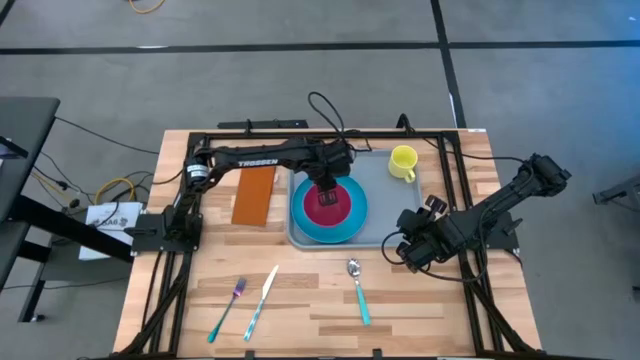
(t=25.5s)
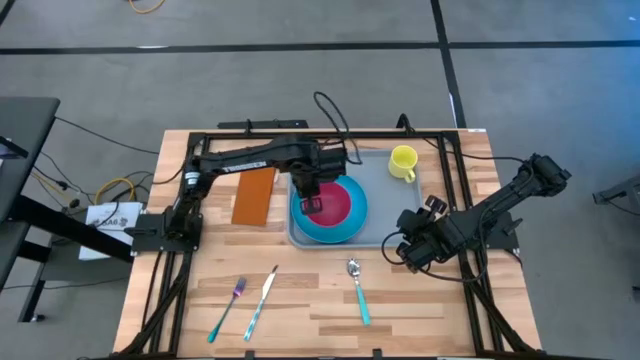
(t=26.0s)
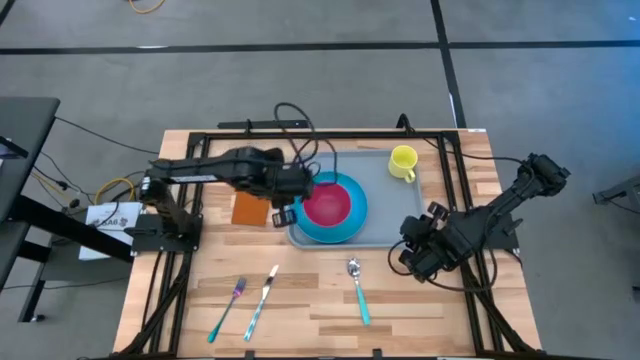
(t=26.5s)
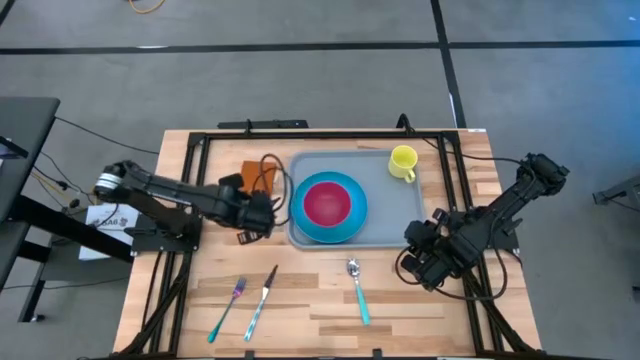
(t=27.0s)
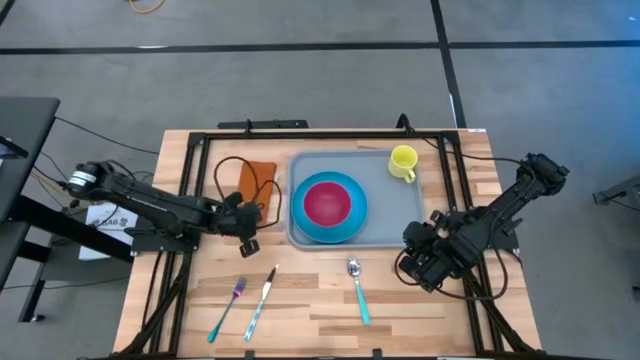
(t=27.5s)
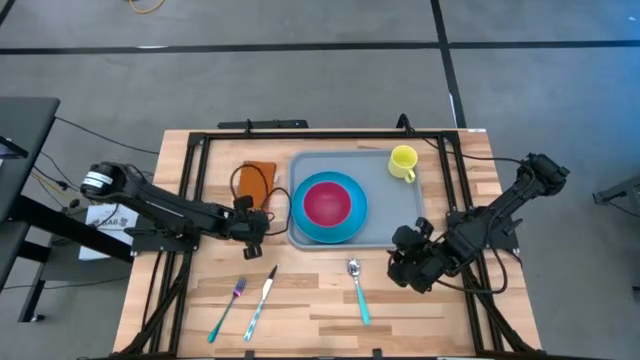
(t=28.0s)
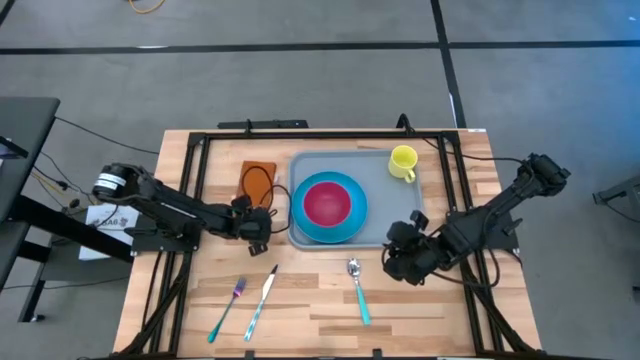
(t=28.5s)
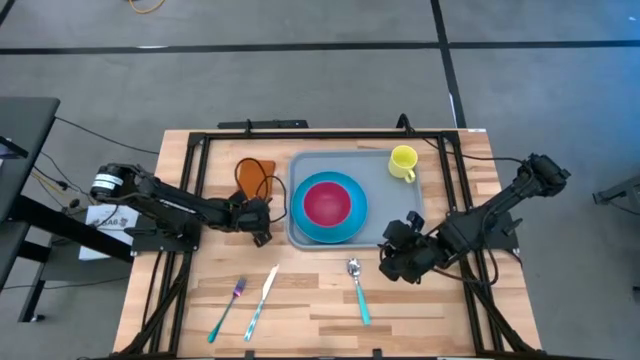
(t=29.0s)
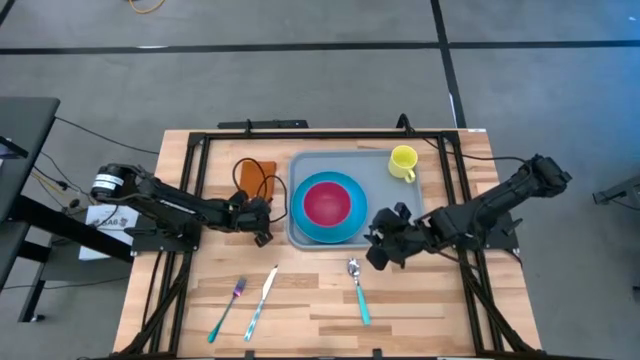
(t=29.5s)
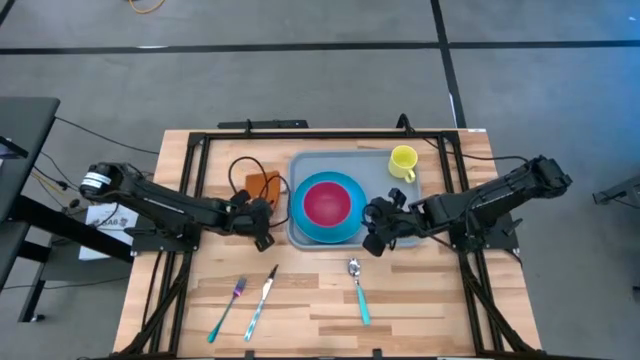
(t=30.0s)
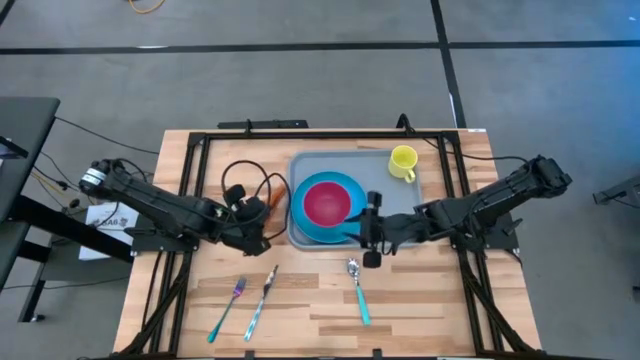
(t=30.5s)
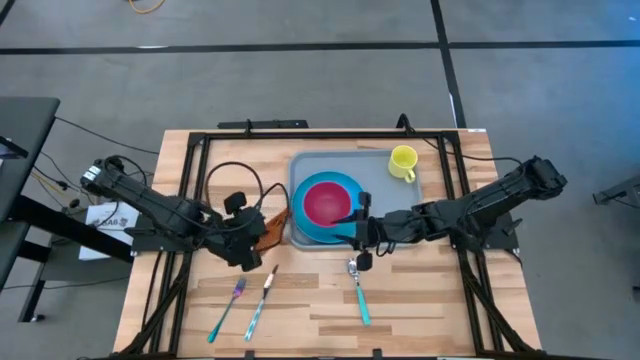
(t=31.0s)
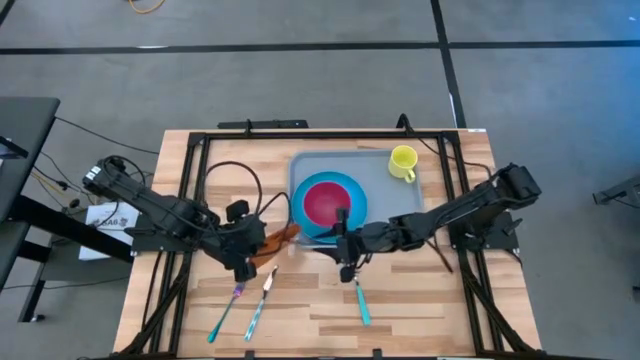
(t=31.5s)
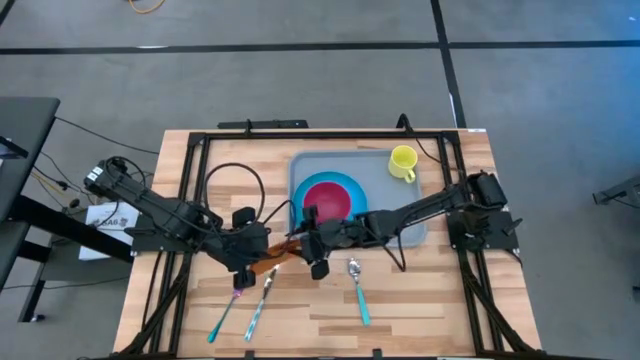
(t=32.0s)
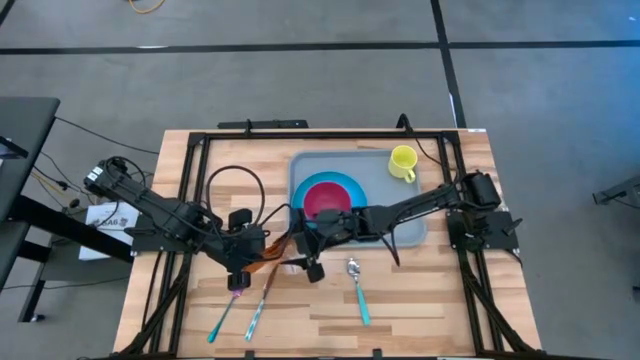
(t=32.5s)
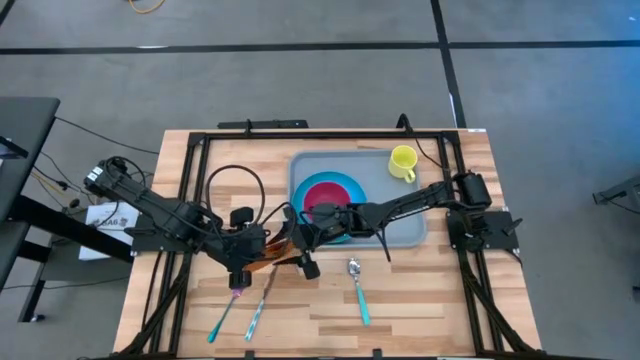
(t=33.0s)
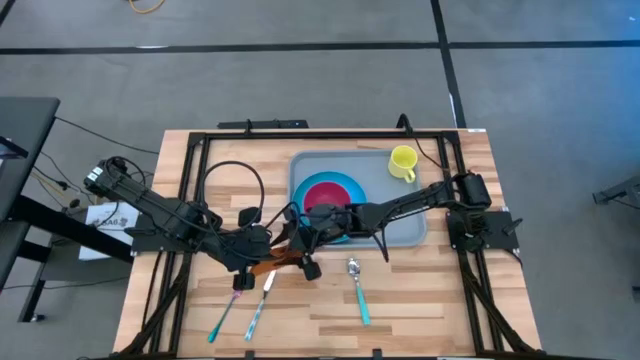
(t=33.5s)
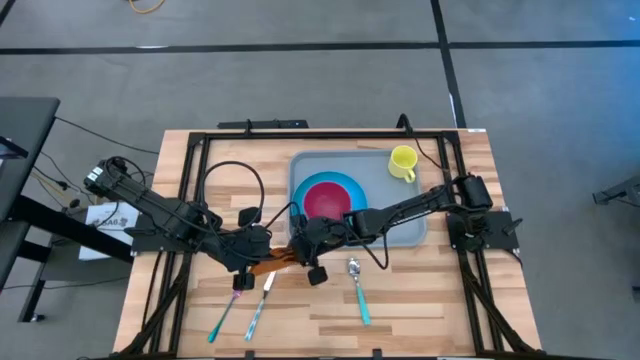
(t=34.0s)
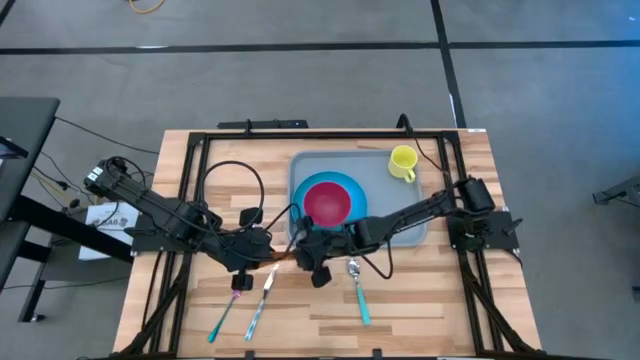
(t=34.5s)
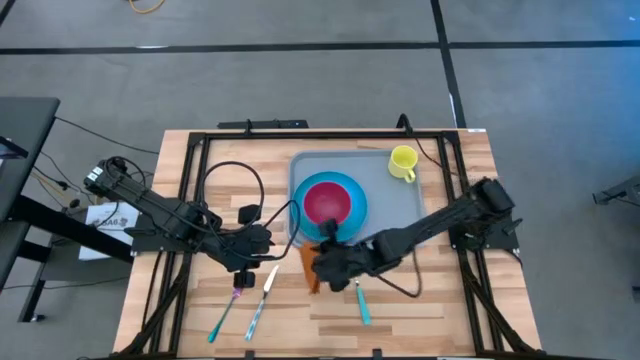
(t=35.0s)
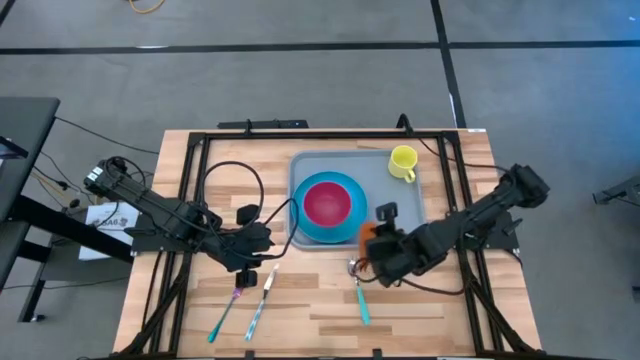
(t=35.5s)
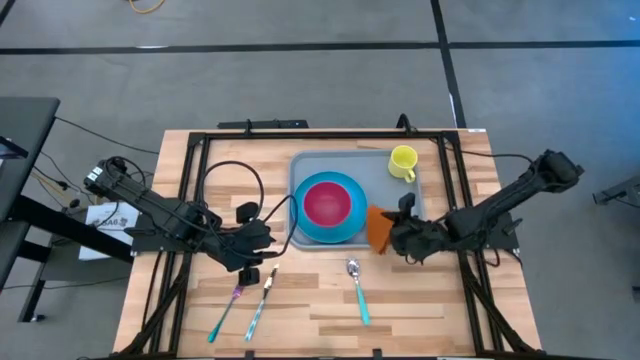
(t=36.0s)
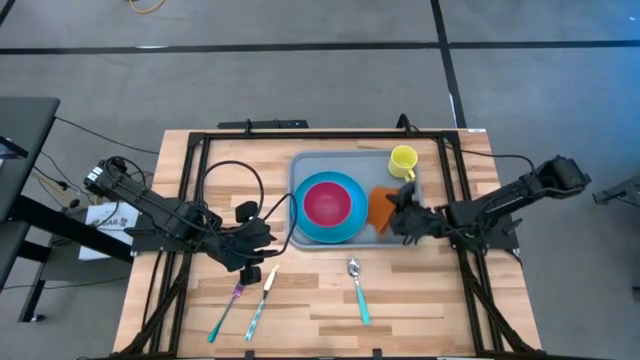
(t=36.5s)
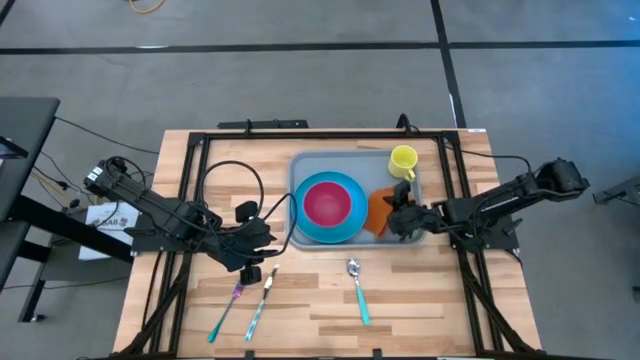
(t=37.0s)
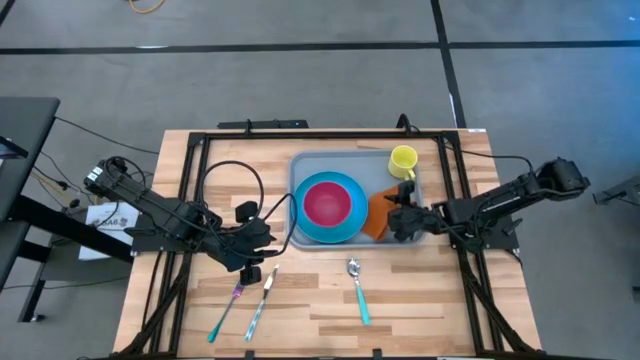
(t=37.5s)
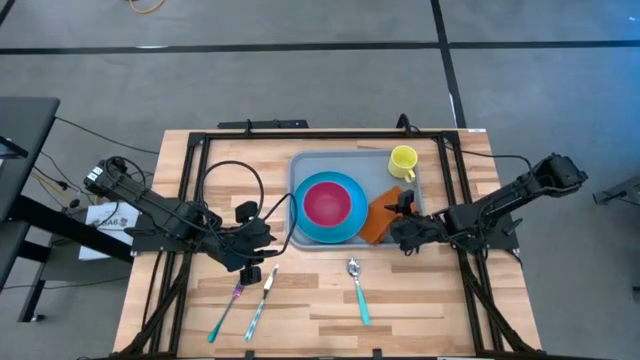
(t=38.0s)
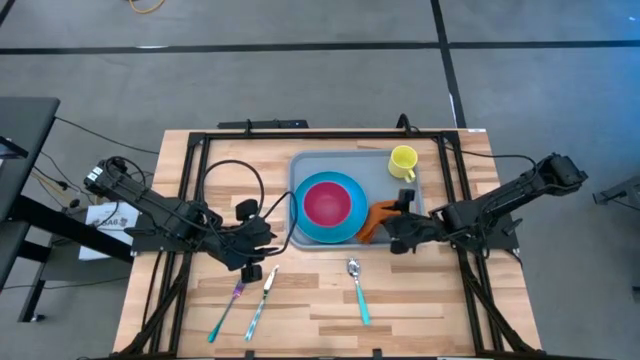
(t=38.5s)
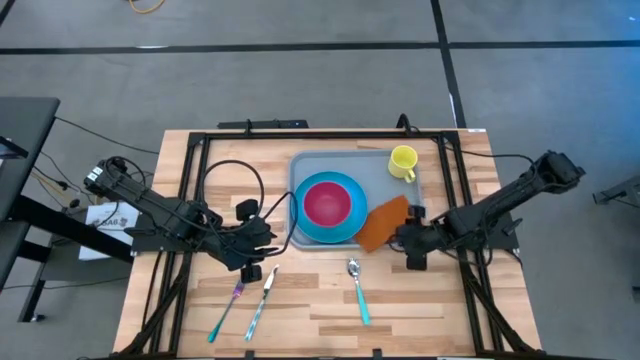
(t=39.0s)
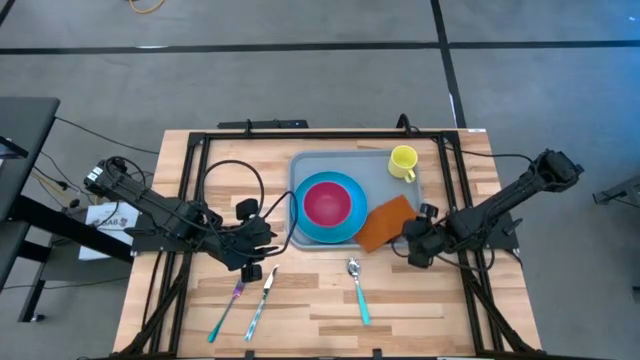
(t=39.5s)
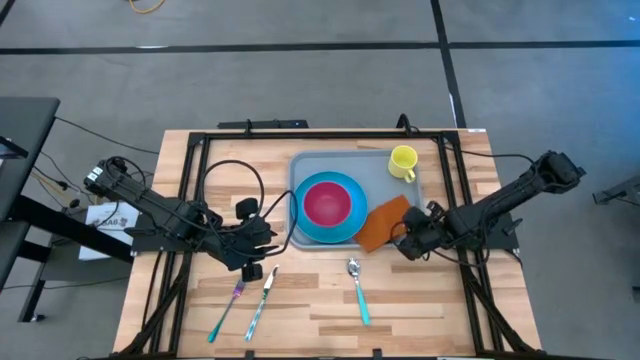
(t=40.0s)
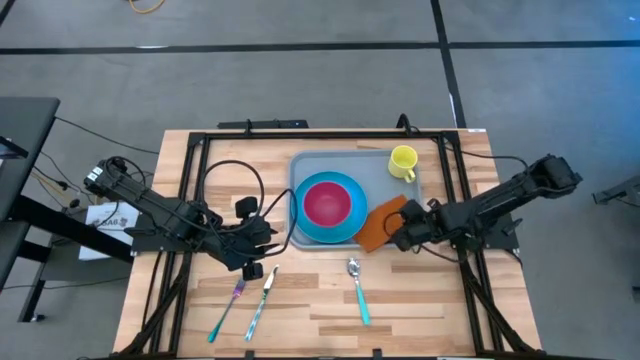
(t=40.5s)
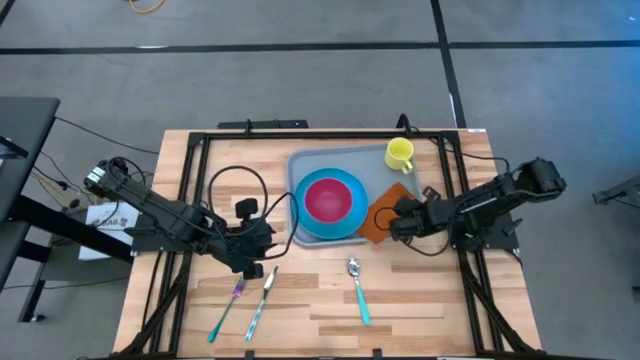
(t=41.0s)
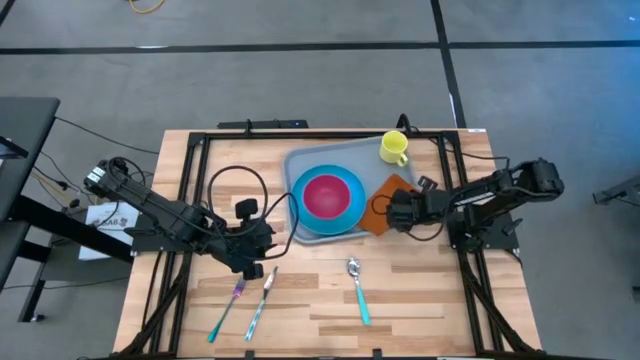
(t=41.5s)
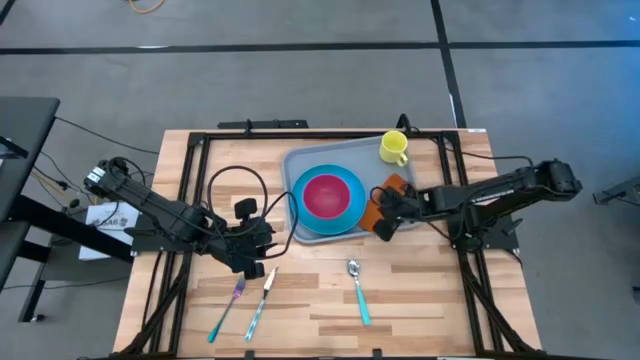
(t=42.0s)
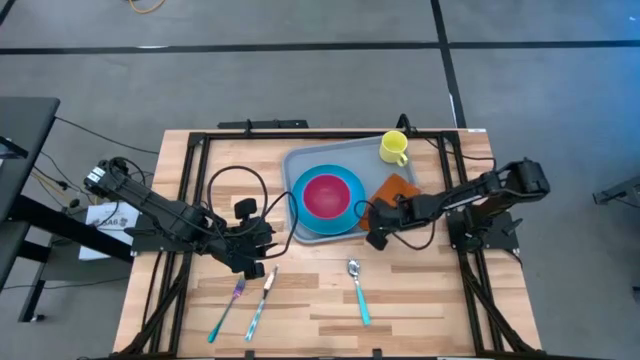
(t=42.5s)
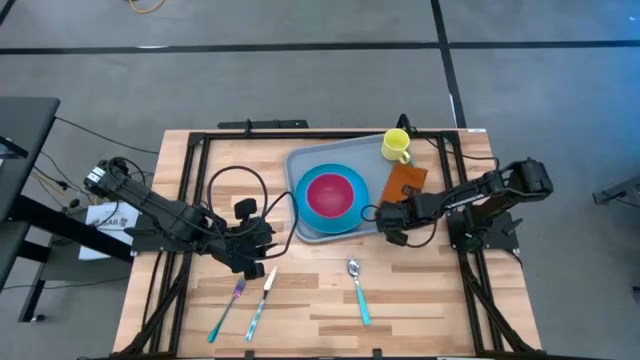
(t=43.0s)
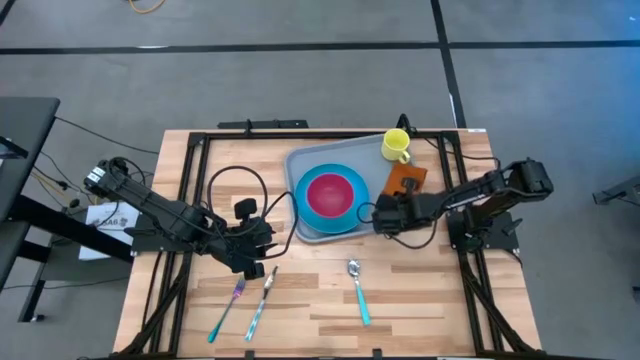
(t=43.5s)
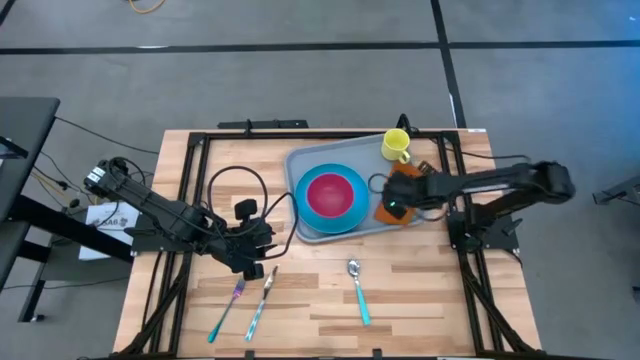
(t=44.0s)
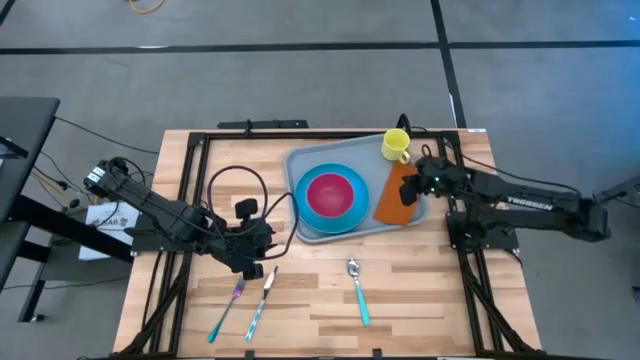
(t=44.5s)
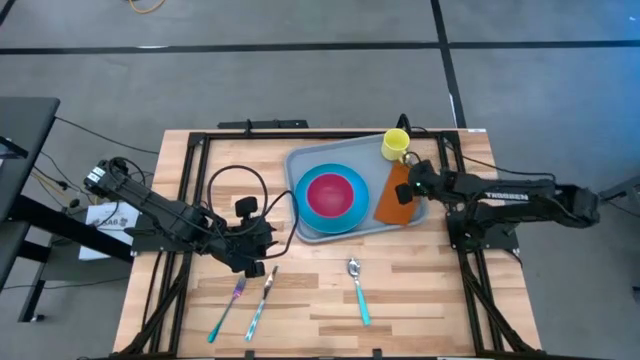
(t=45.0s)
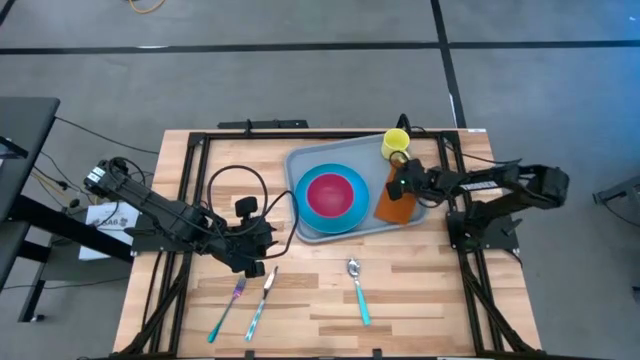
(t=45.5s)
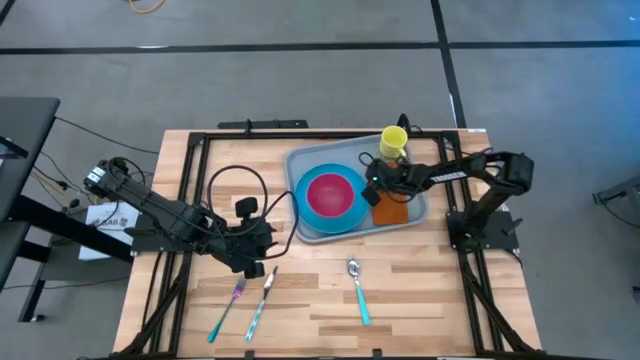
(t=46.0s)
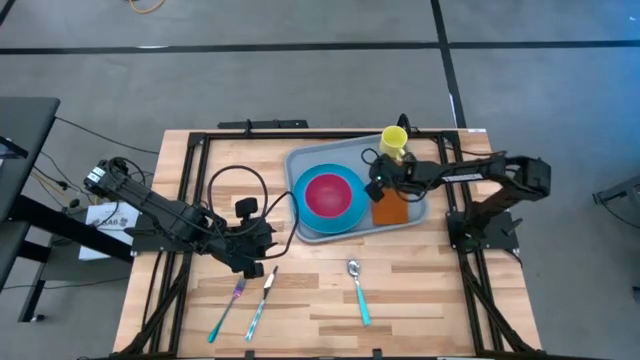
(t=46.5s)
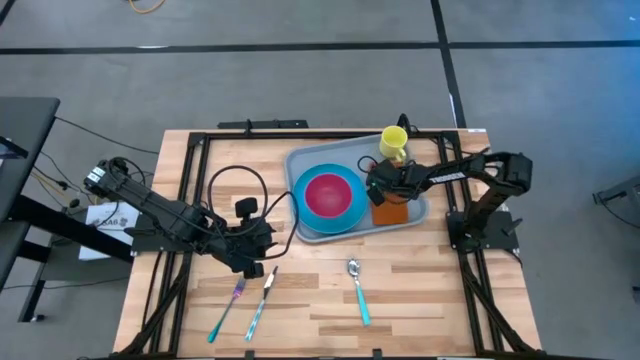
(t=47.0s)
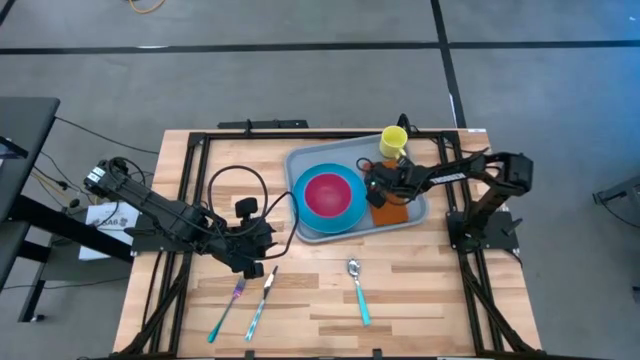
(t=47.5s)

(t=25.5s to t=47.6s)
Task: Set up tray
Put the orange napkin on top of the gray tray to the right of the blue plate
